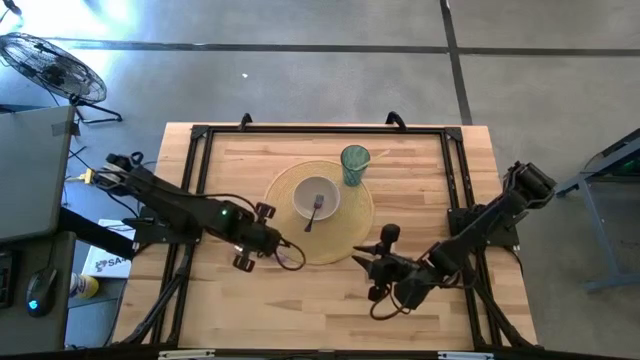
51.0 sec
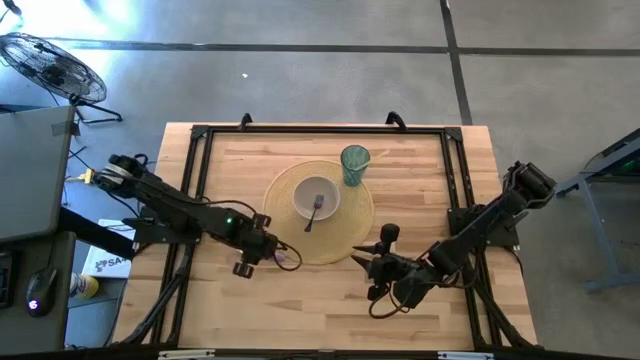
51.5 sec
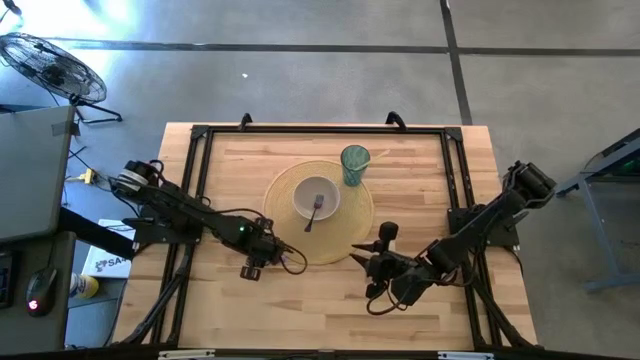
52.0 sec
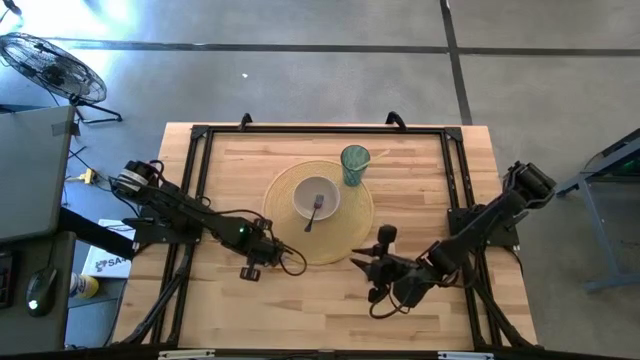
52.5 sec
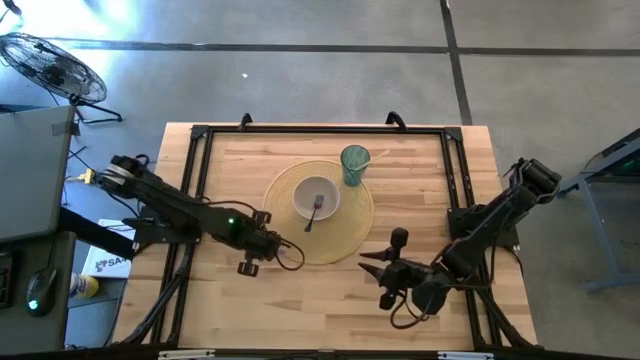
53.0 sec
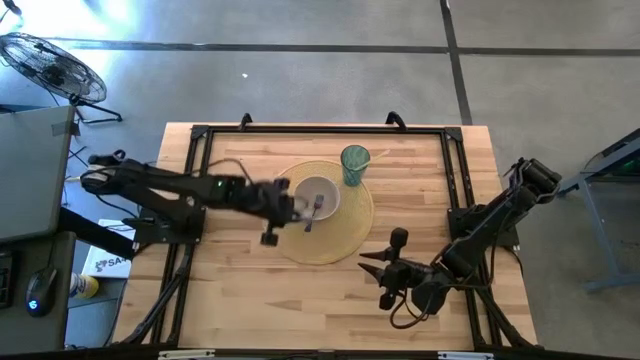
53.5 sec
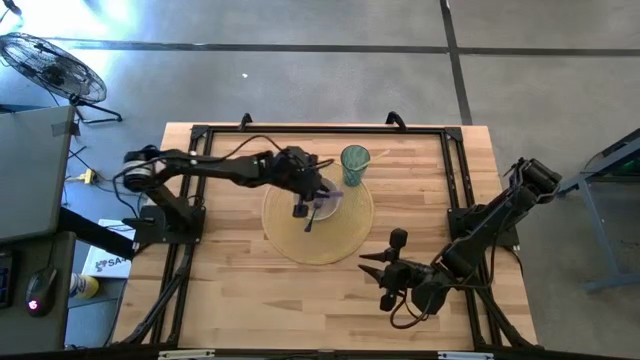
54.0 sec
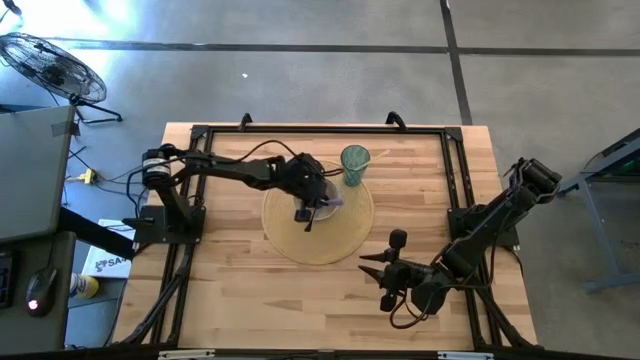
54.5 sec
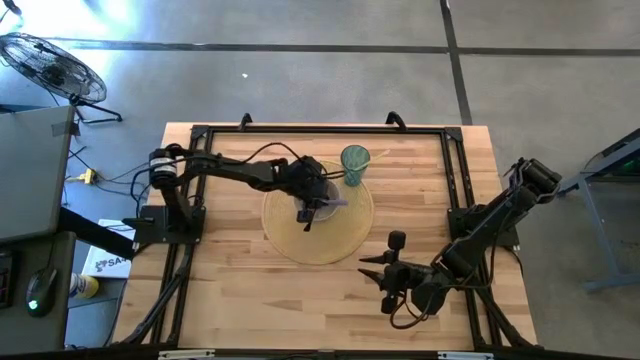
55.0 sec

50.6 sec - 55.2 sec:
Task: Pick & Place Utensil
Place the purple spoon into the white bowl

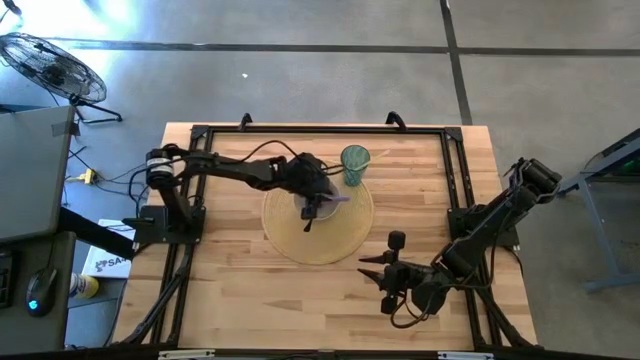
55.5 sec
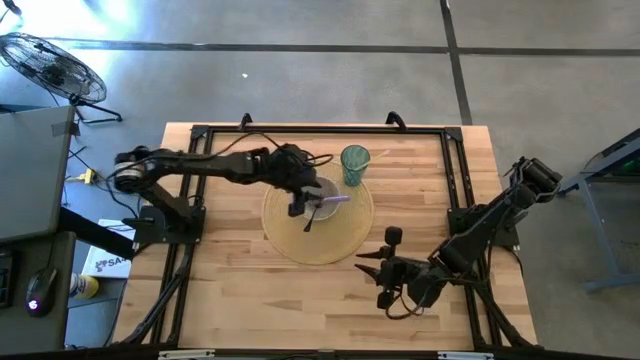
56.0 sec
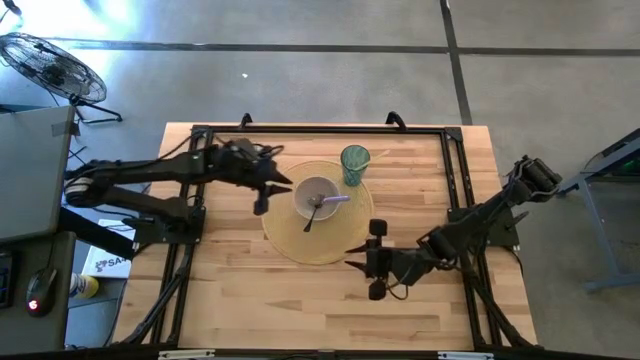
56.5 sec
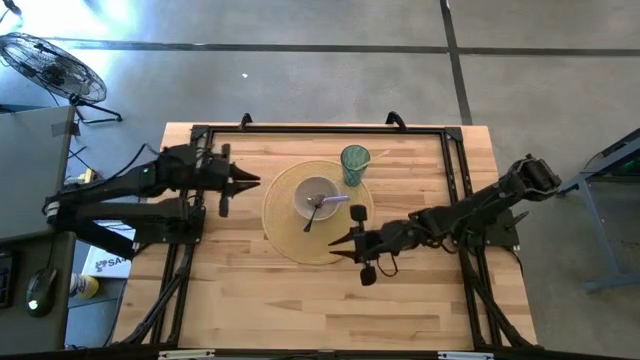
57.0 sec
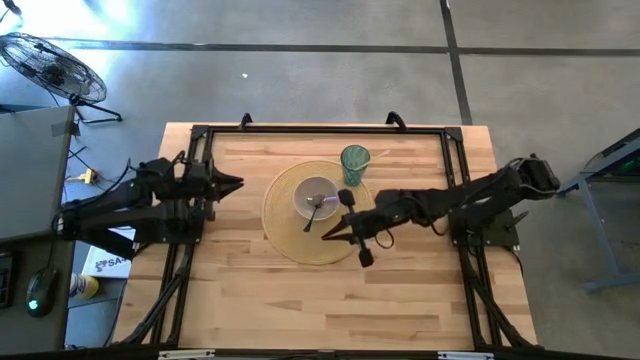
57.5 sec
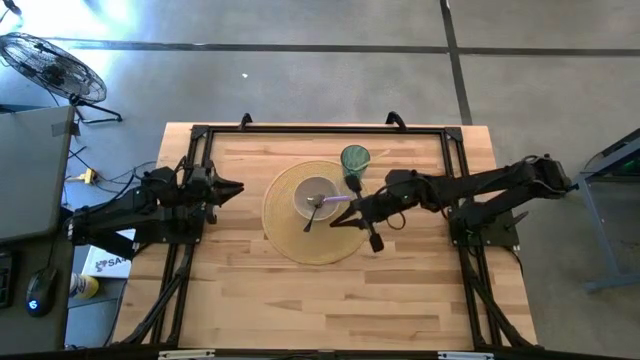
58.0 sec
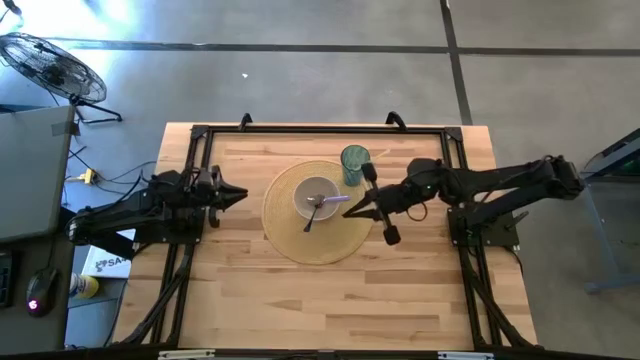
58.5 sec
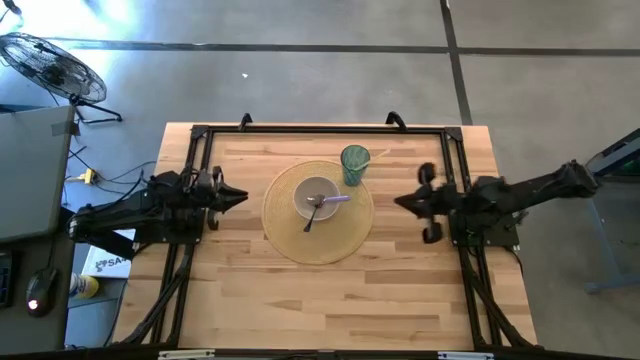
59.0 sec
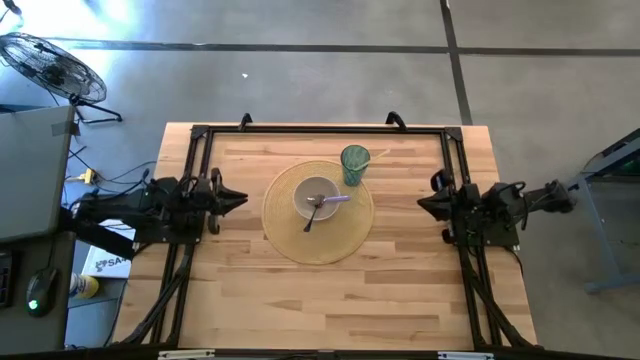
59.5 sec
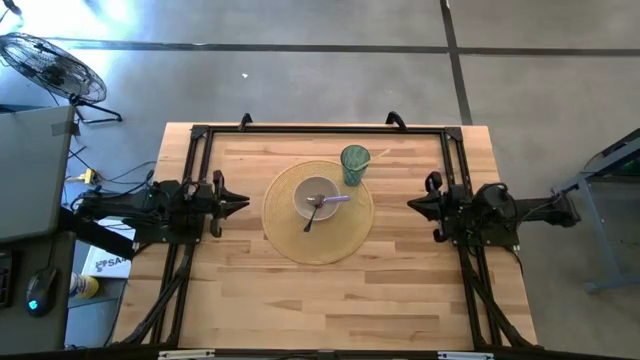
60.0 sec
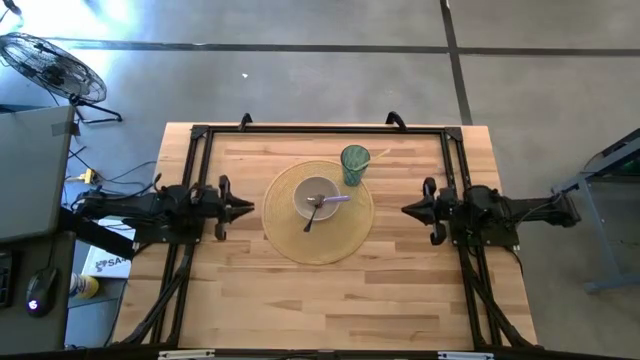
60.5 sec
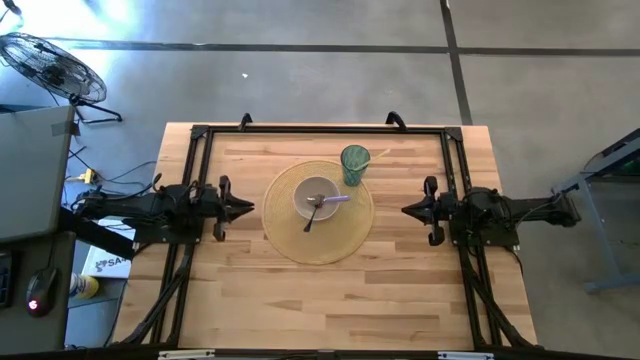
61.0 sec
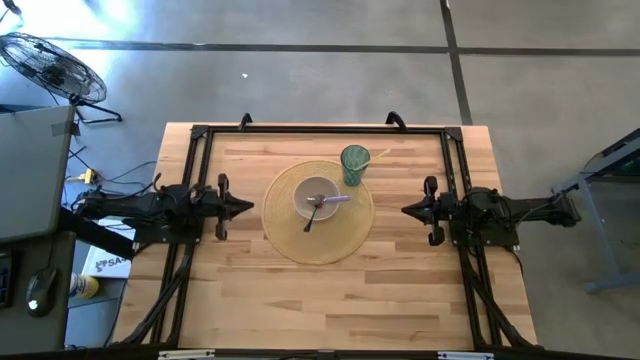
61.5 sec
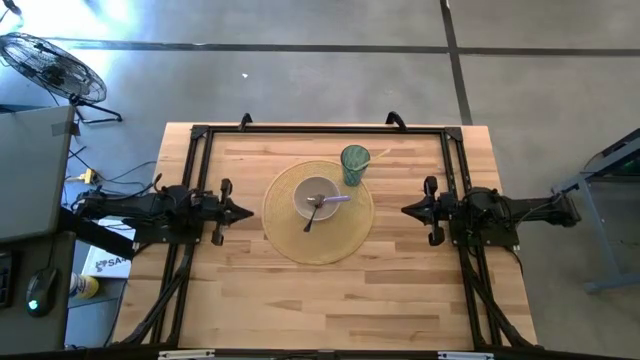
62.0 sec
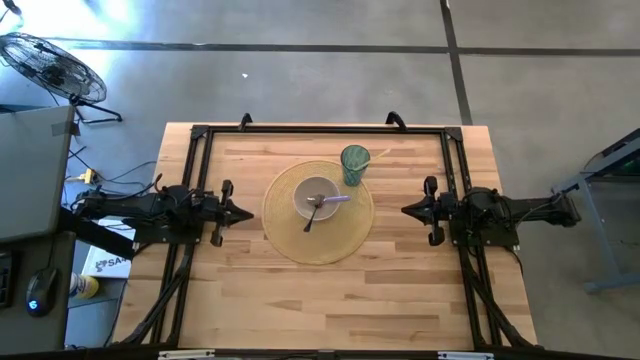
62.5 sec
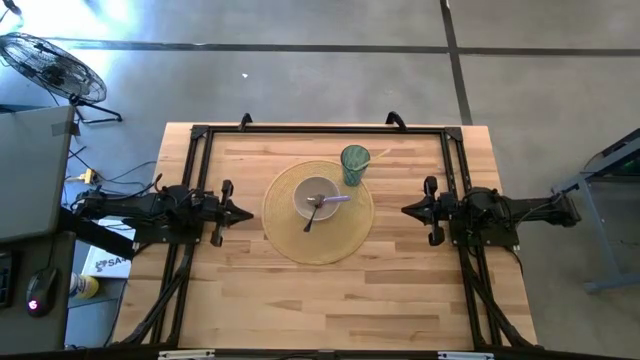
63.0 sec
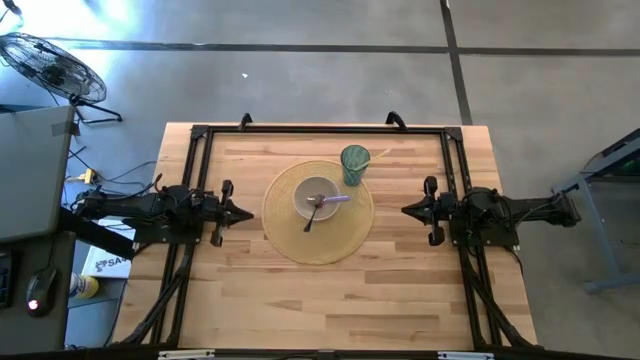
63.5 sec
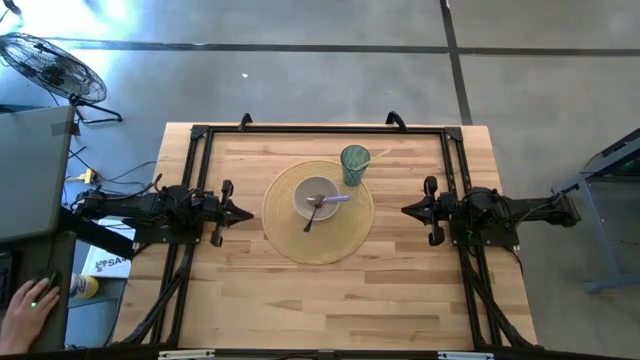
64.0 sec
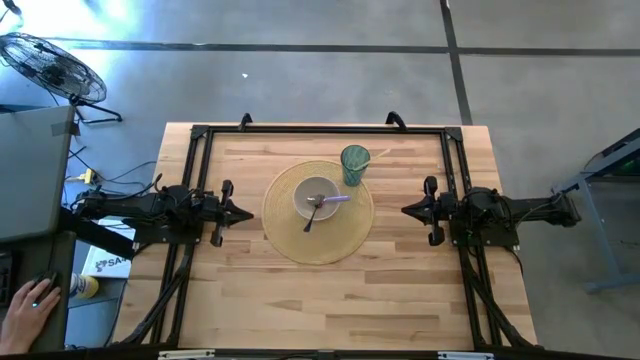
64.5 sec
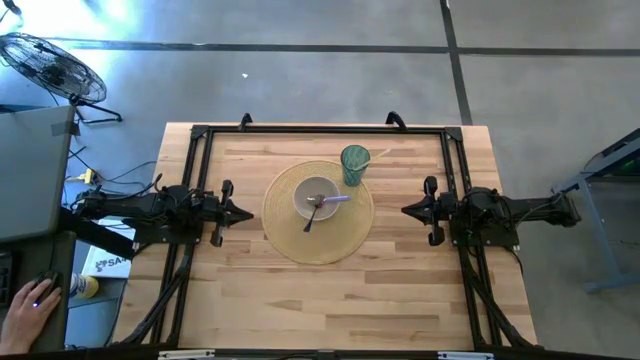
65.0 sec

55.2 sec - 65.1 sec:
Return to Home Position

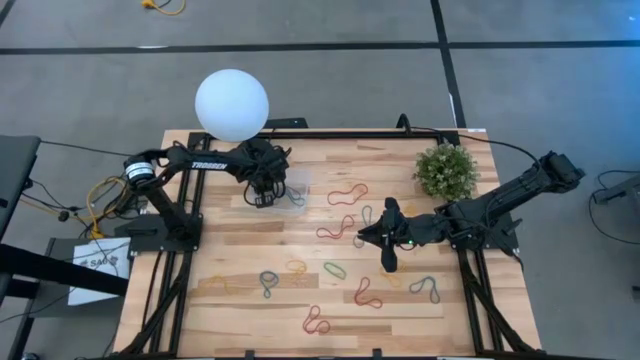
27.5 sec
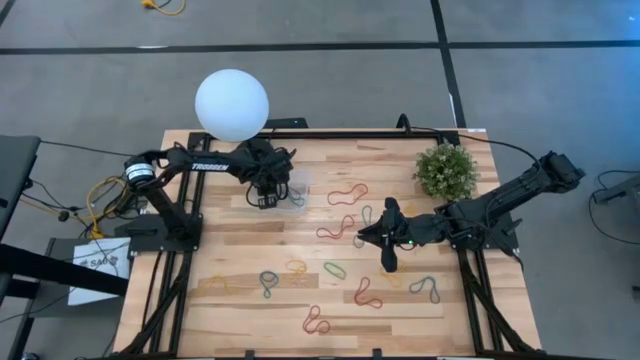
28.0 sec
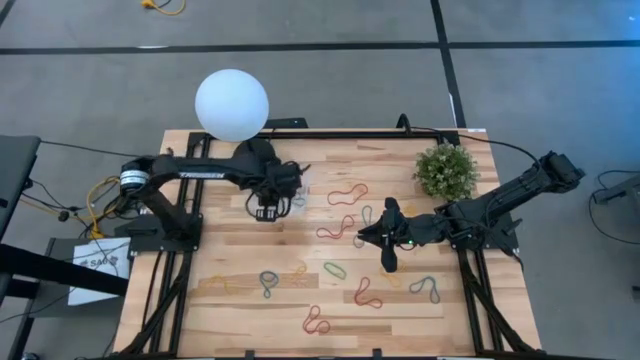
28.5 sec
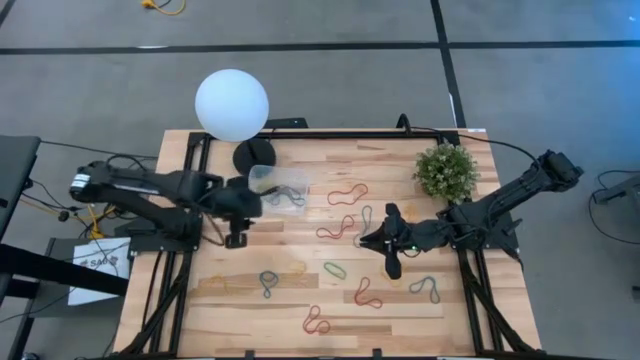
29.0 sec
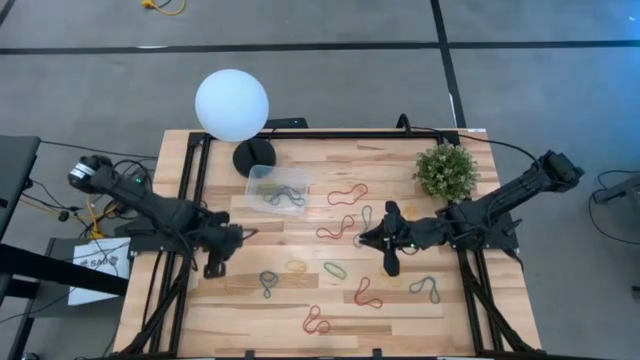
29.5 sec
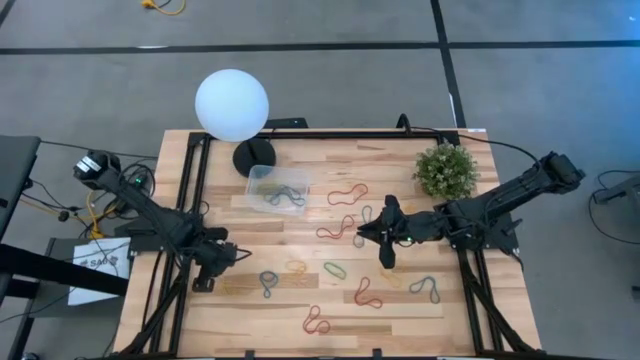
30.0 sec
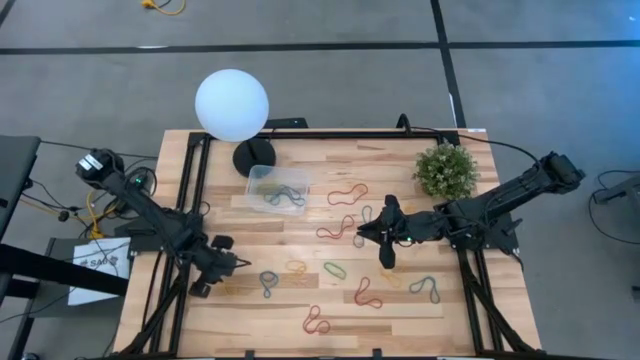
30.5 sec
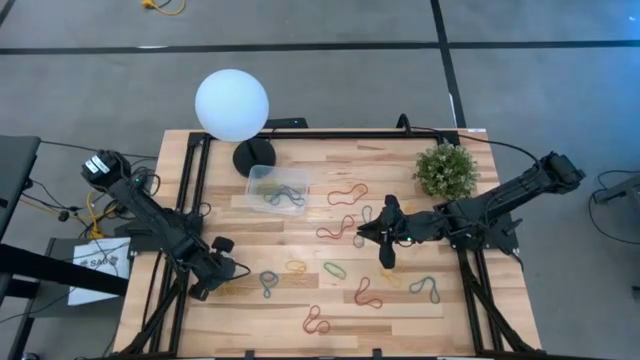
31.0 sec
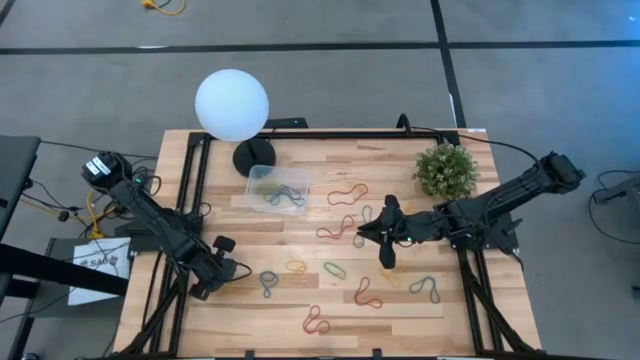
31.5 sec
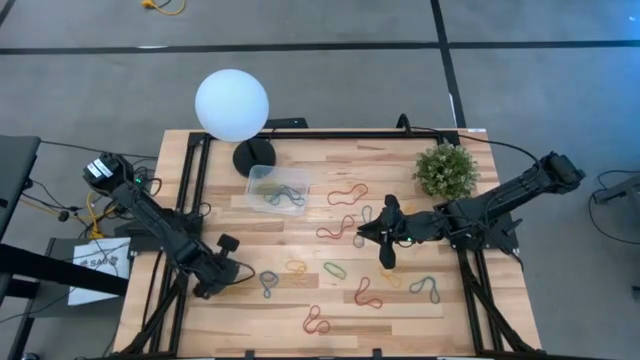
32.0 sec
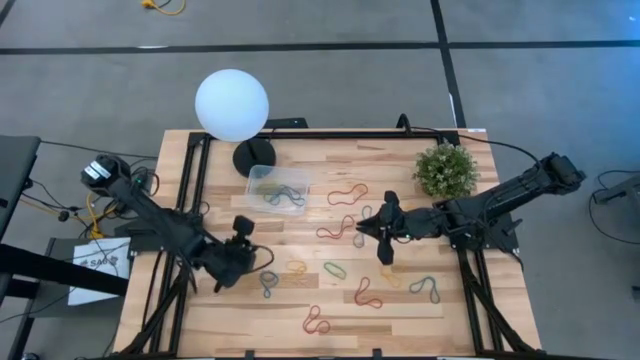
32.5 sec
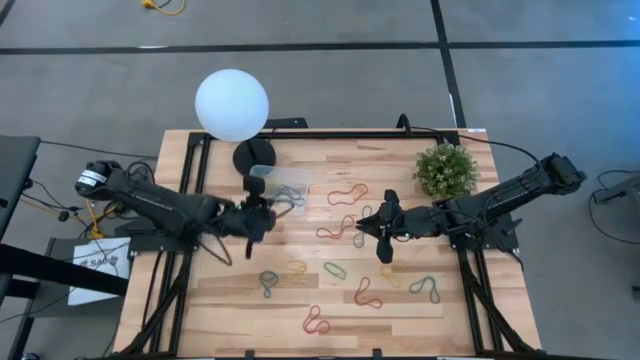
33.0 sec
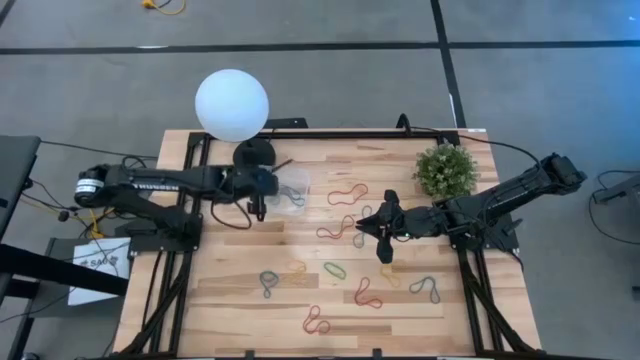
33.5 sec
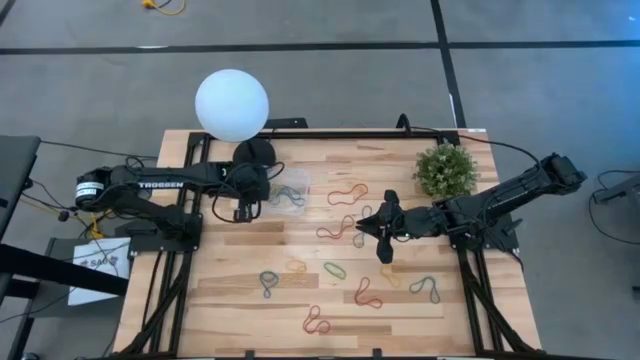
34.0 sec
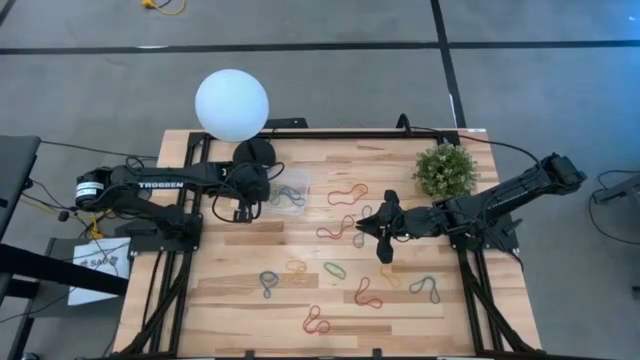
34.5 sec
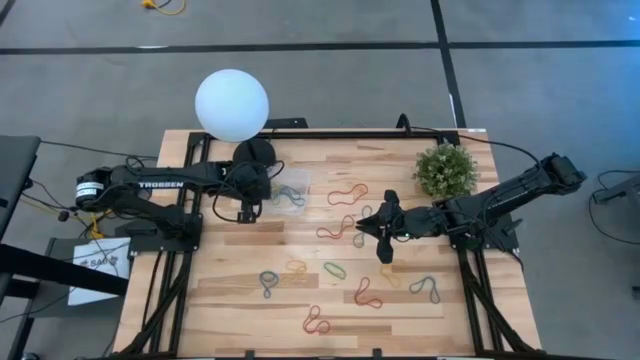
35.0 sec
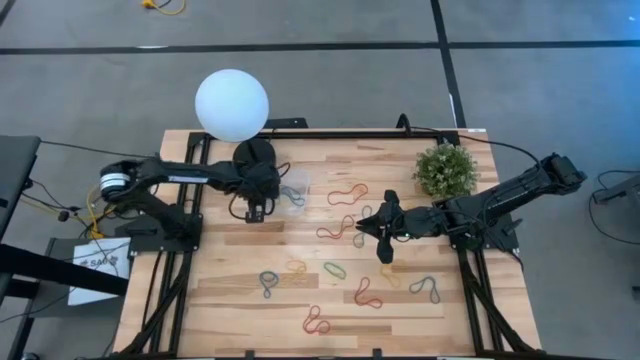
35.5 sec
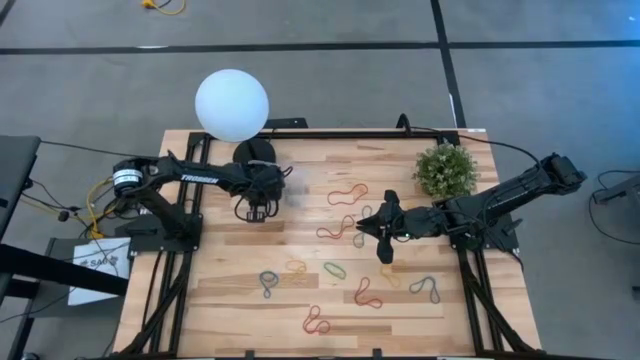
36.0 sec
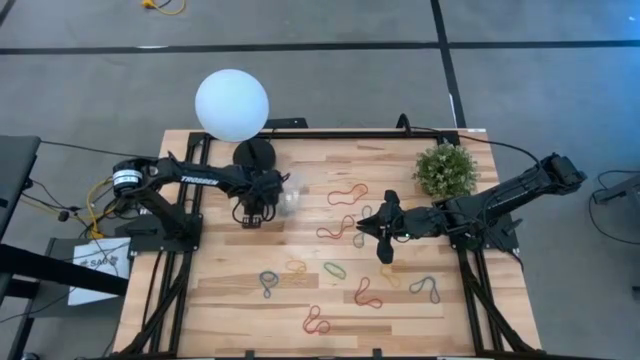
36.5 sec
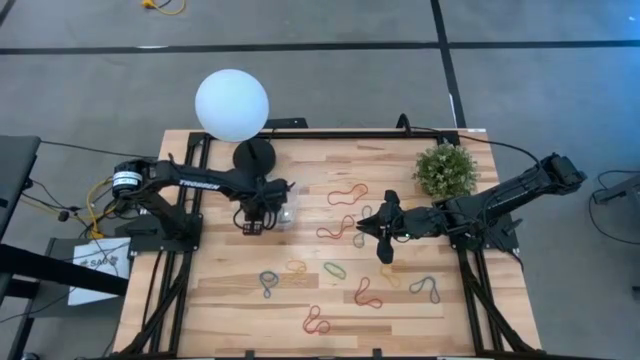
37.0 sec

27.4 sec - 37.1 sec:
Task: Pick and place rubber bands into bin
Put the yellow rubber band into the transparent container
